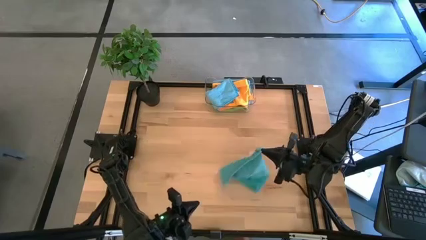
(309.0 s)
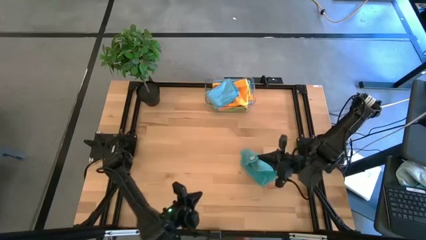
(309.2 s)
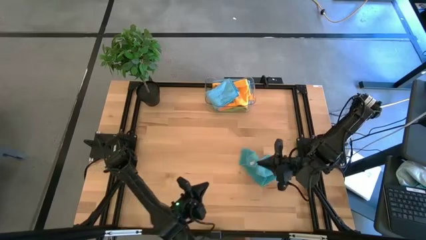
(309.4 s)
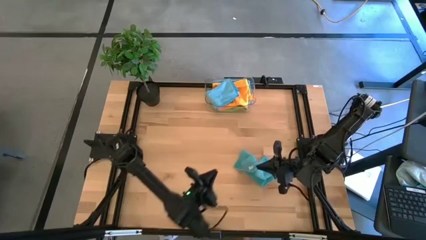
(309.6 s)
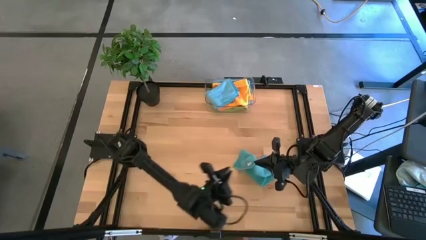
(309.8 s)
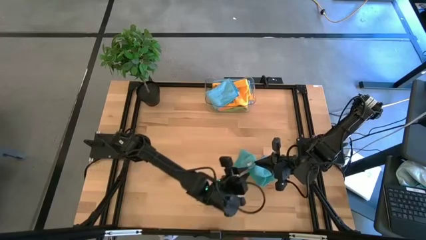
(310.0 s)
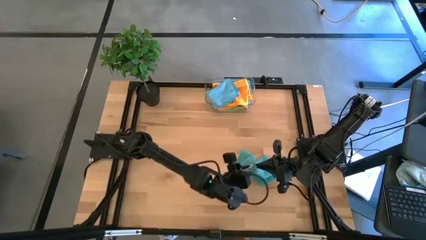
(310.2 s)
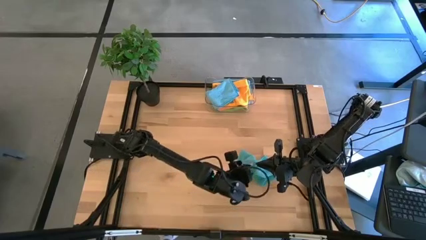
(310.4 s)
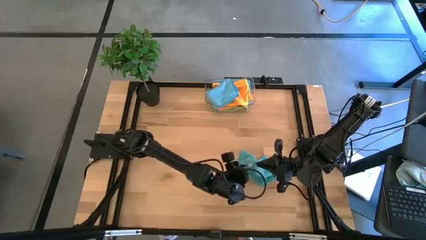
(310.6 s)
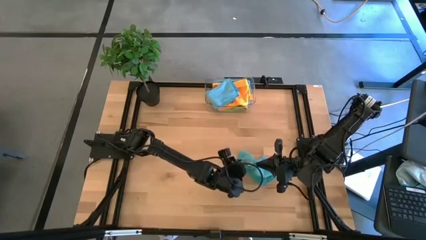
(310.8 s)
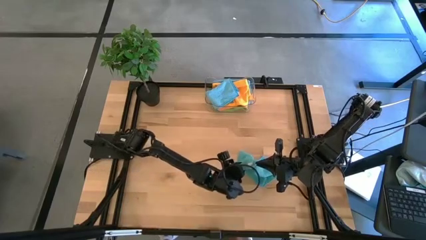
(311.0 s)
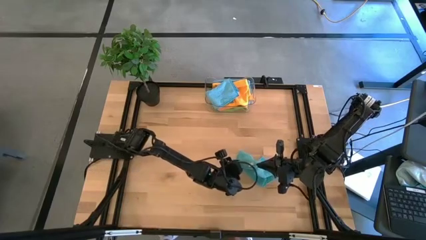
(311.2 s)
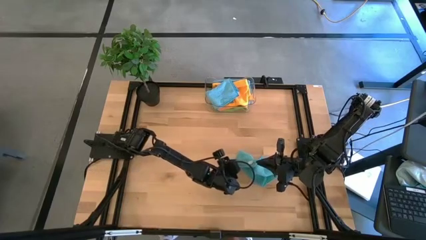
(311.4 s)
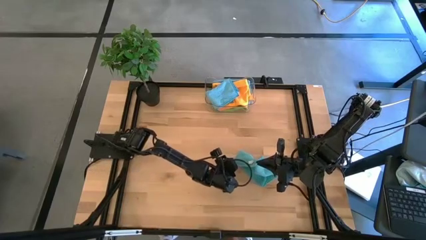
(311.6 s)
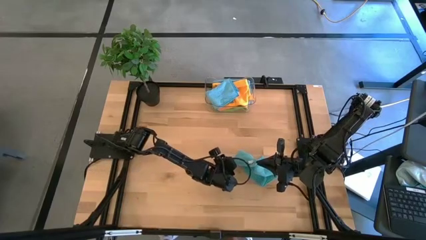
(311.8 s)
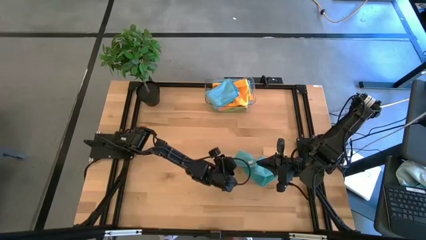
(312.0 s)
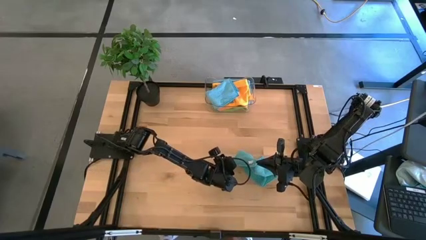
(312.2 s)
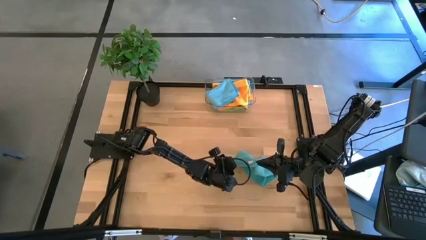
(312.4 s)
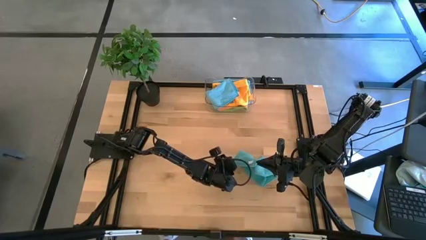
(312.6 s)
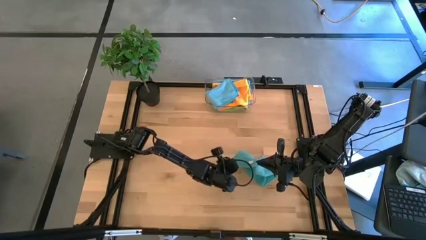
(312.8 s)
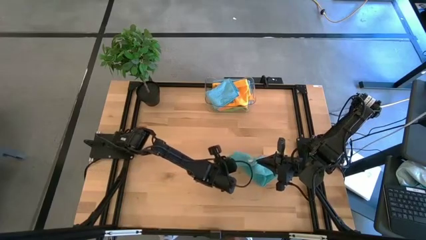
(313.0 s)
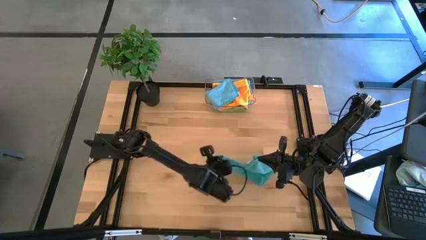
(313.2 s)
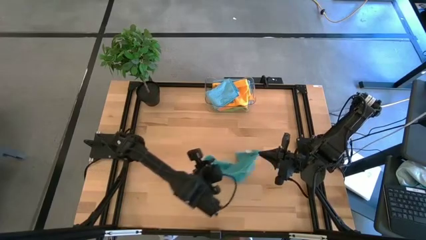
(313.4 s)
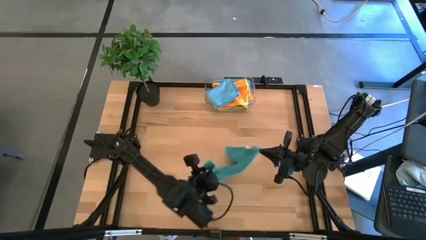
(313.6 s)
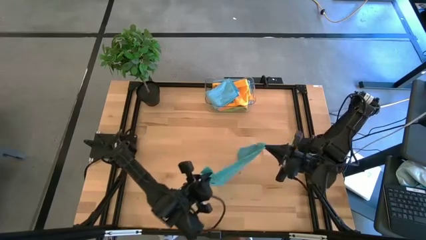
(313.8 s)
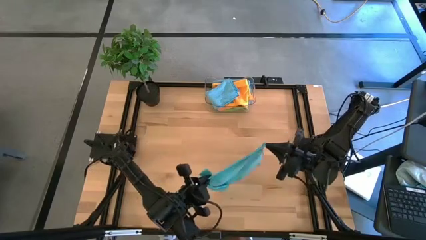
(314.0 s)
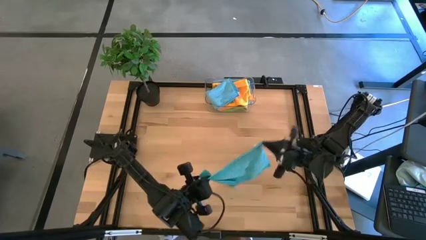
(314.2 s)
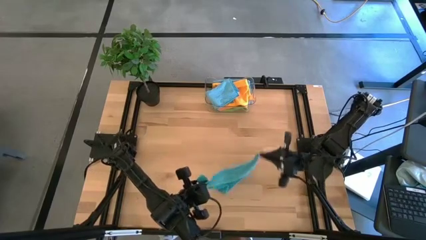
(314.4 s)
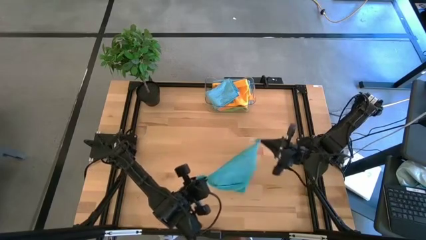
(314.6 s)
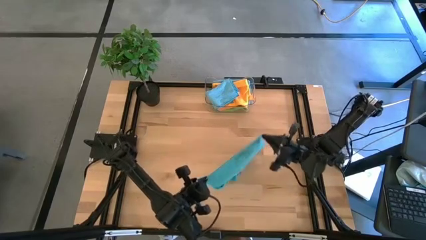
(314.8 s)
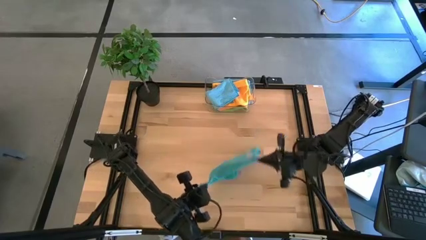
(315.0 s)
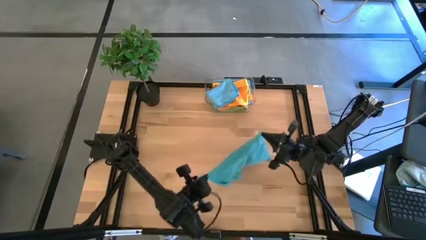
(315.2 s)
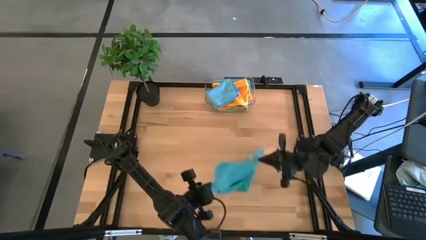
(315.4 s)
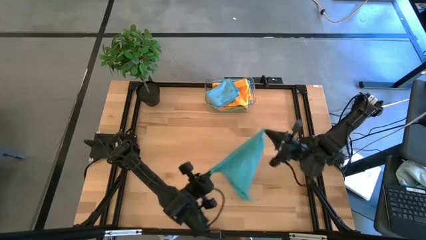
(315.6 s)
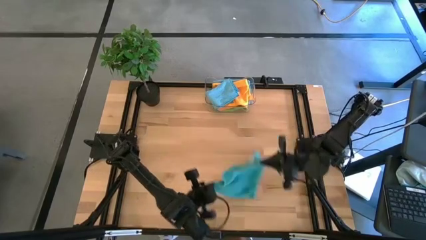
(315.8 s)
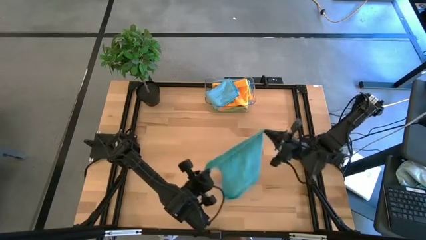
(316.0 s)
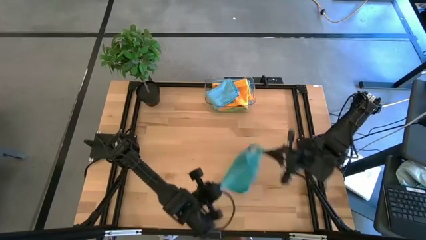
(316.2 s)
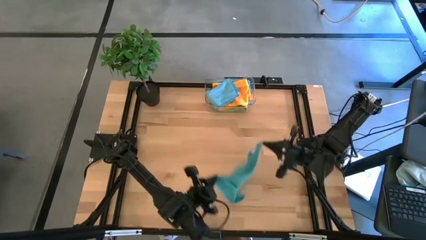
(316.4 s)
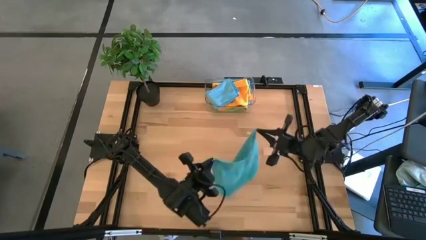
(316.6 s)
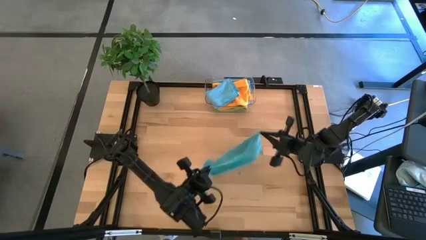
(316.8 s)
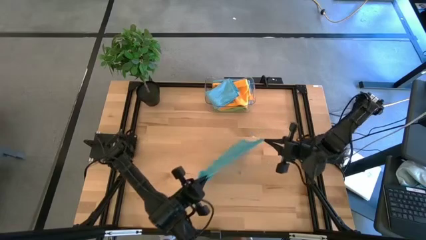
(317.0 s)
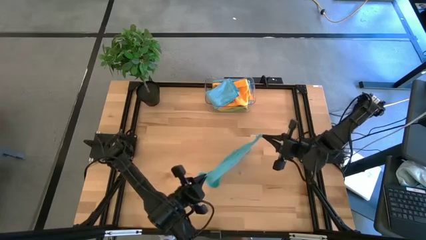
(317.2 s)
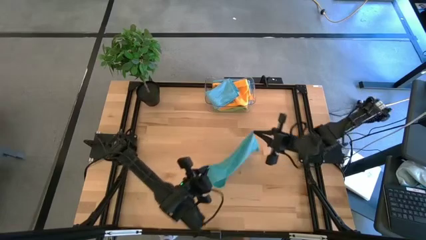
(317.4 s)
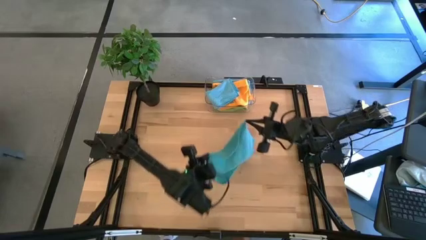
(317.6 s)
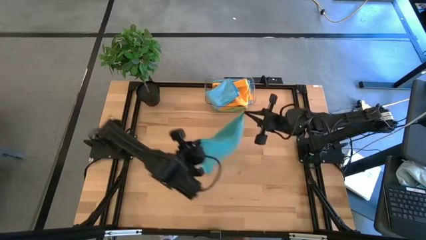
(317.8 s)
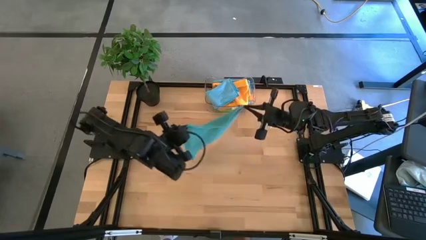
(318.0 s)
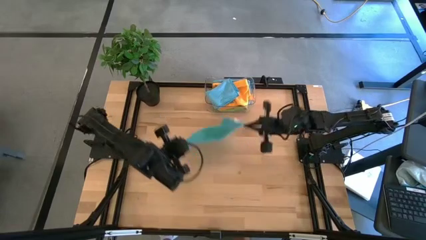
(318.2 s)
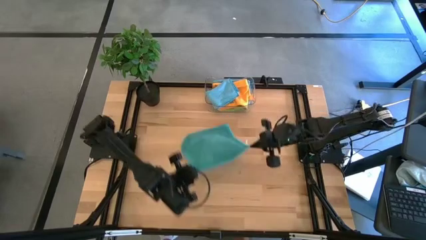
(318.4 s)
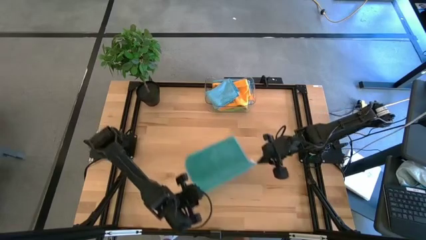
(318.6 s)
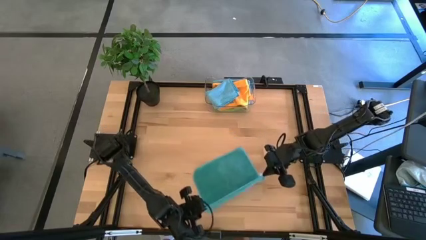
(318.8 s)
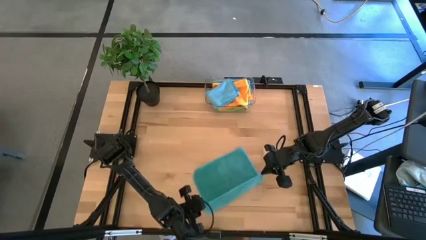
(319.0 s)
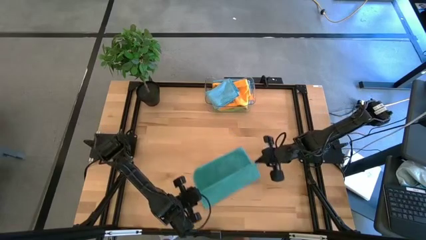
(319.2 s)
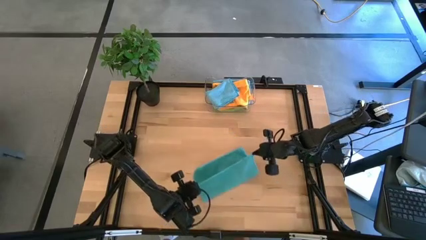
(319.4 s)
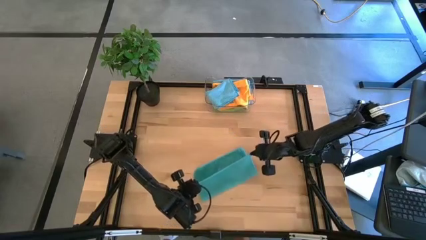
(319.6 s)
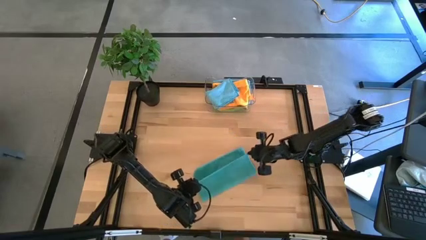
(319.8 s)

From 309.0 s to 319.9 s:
Task: Fold microfiber towels
Fold the blue microfiber towel

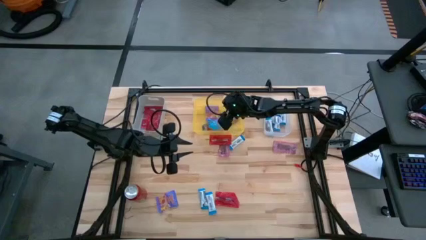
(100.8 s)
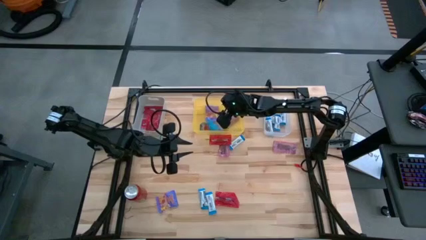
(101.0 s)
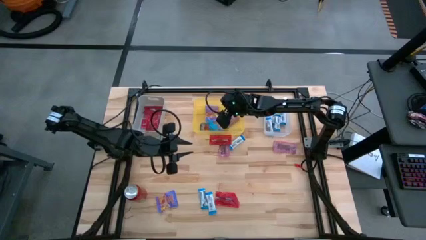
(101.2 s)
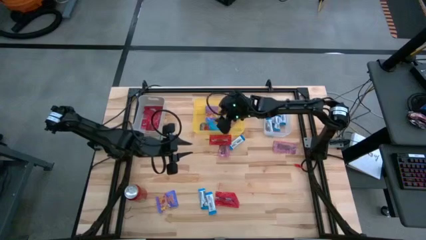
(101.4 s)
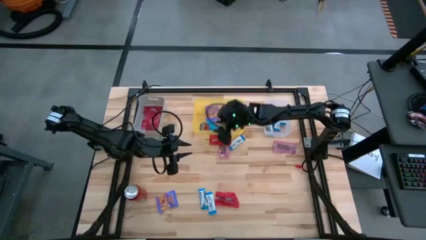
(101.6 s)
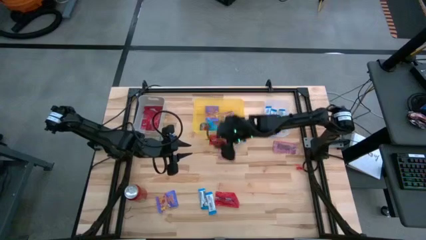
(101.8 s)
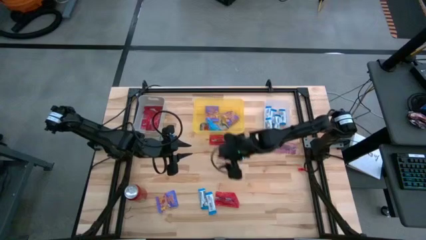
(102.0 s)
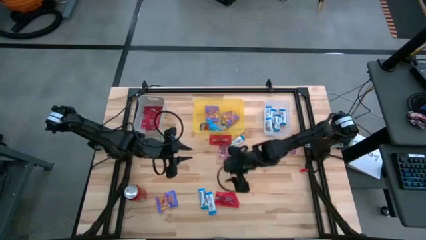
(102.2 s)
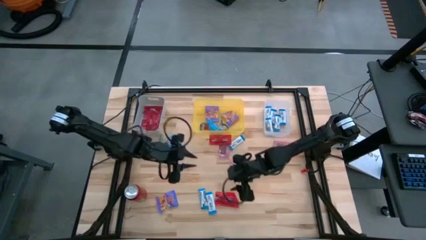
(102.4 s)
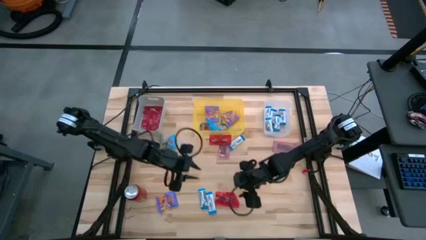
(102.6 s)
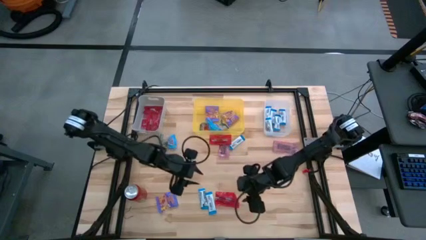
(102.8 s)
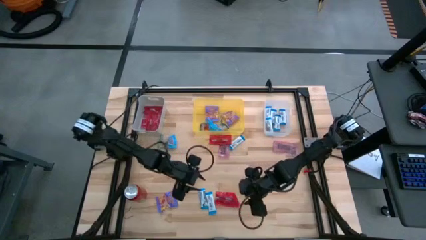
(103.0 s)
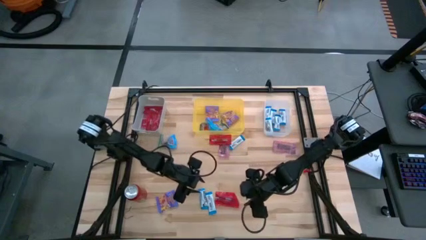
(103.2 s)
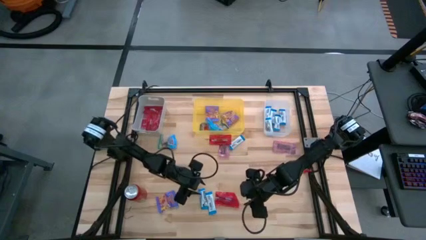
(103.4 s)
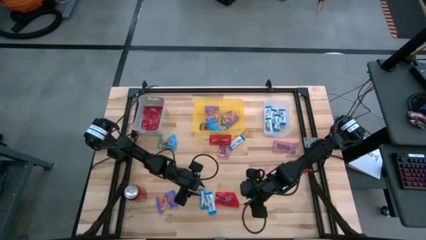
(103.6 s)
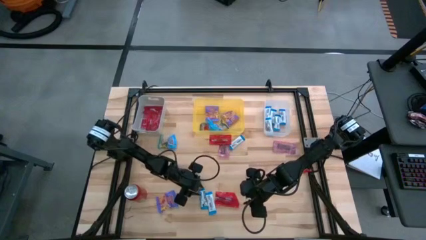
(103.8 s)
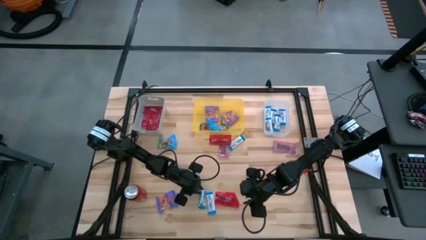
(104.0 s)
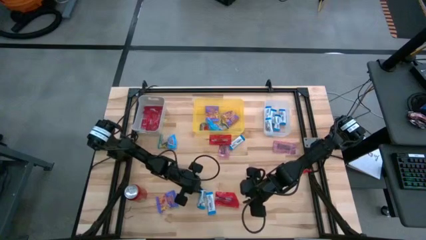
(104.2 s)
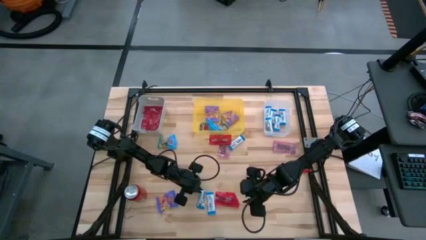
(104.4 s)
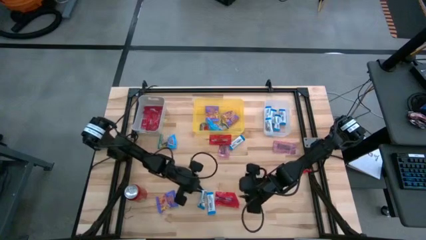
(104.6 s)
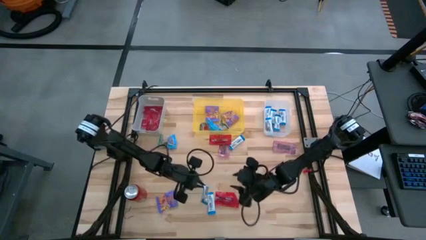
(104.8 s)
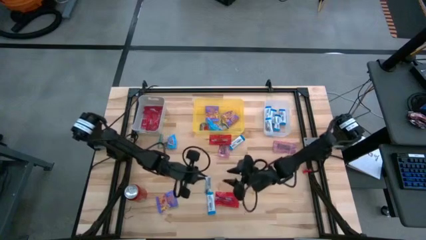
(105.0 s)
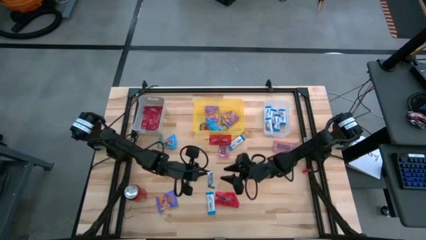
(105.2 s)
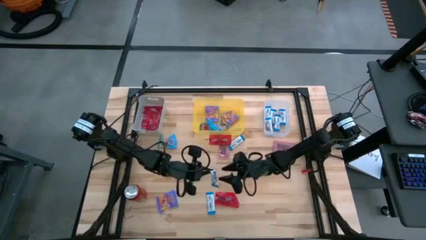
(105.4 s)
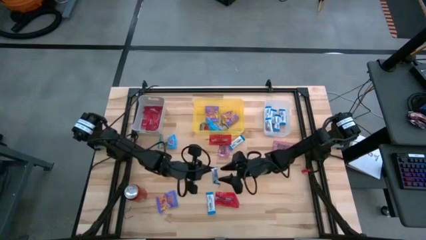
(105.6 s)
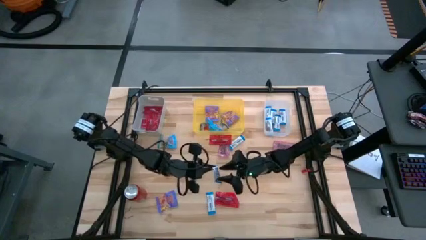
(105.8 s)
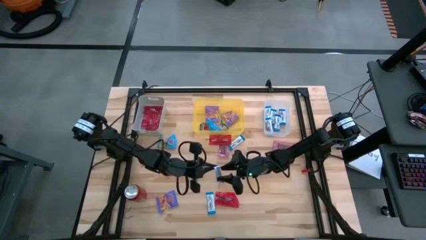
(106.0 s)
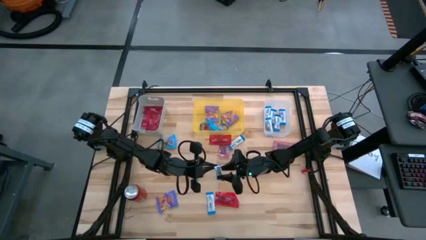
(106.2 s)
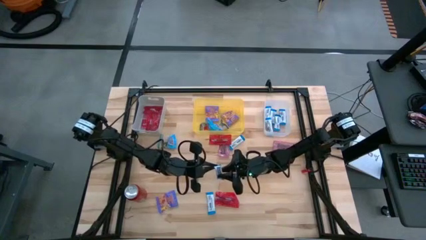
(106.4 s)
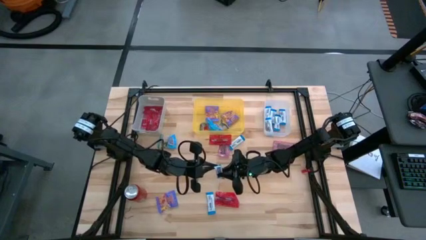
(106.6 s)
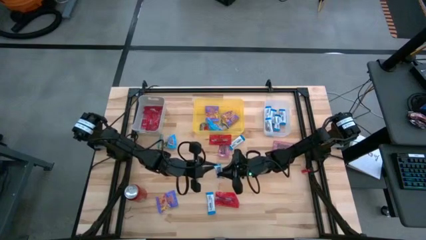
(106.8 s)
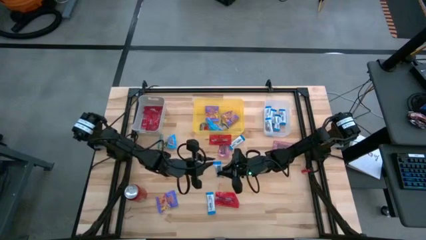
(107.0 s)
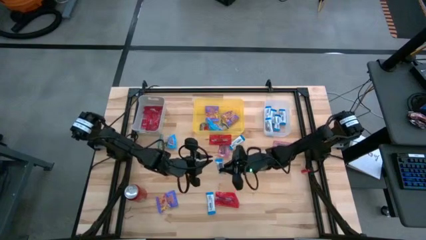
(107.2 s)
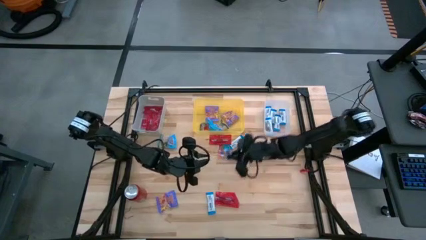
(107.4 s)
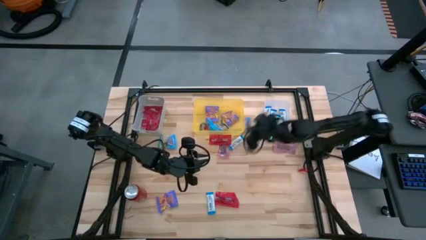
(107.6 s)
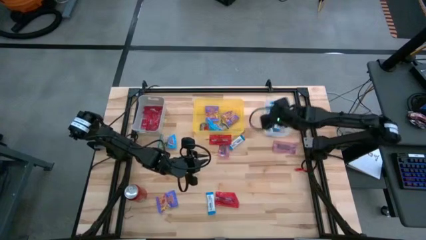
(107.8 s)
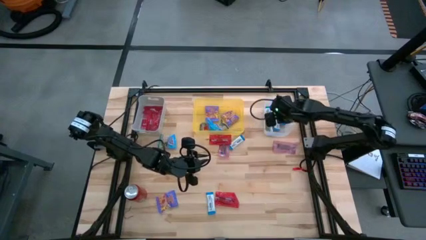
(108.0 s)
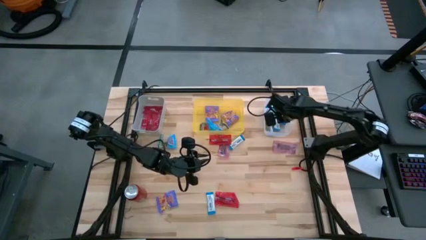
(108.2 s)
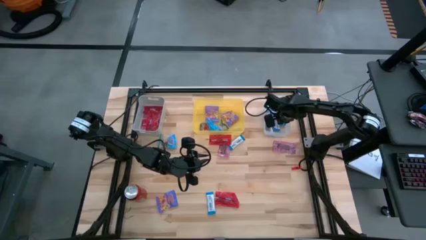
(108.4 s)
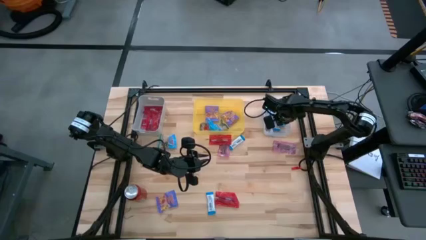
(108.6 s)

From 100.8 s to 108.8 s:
Task: Sort candy
Put the white chocolate into the transparent bin
